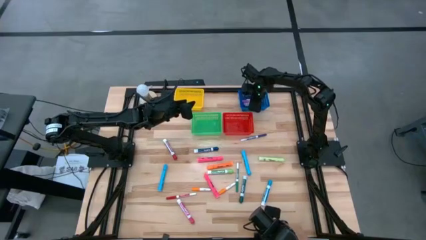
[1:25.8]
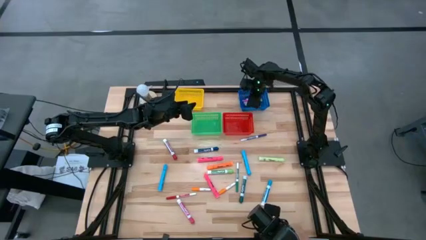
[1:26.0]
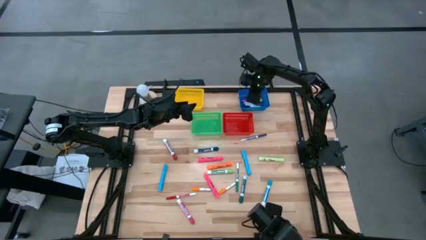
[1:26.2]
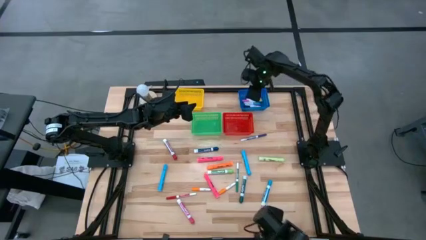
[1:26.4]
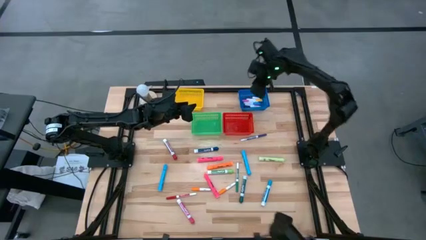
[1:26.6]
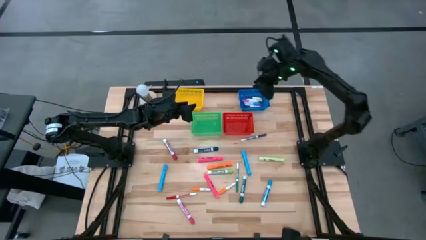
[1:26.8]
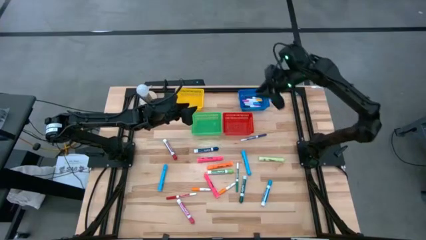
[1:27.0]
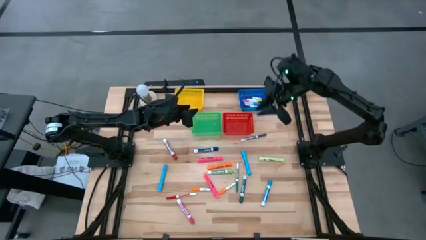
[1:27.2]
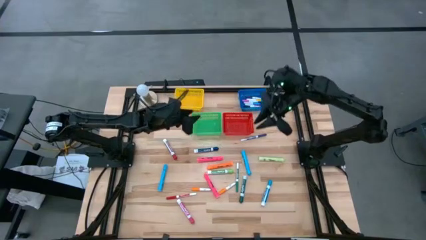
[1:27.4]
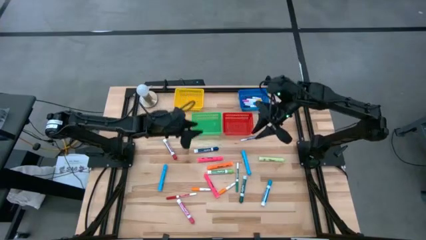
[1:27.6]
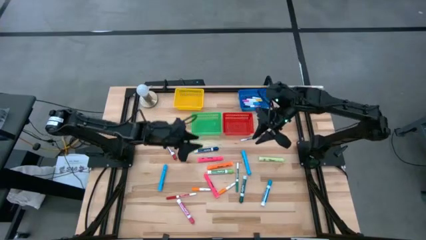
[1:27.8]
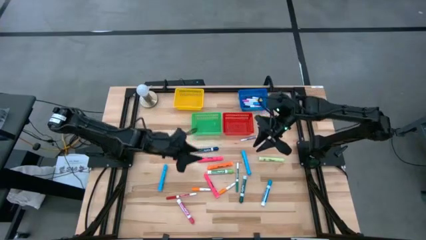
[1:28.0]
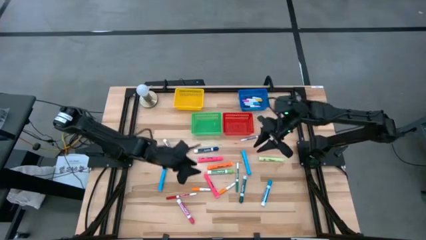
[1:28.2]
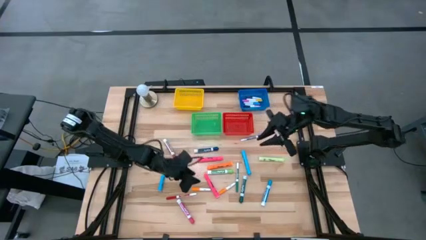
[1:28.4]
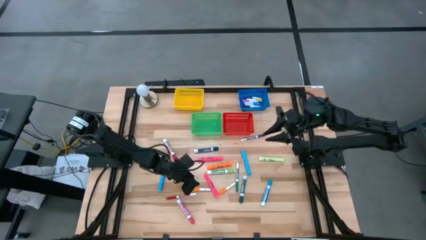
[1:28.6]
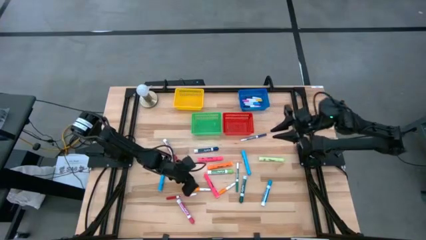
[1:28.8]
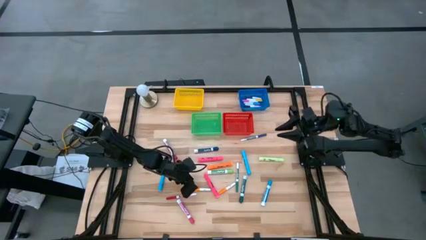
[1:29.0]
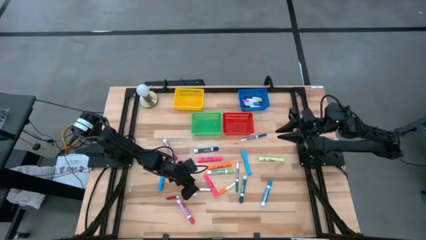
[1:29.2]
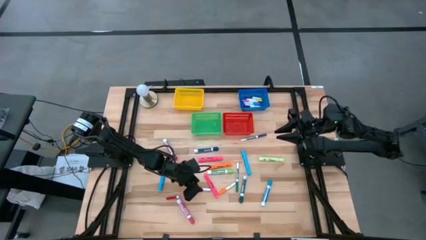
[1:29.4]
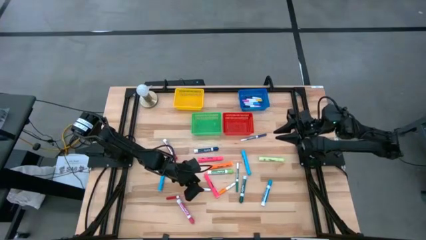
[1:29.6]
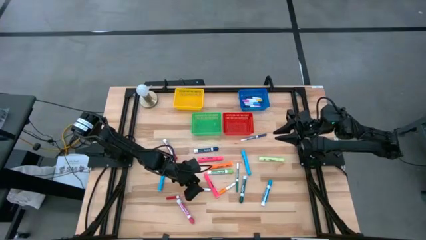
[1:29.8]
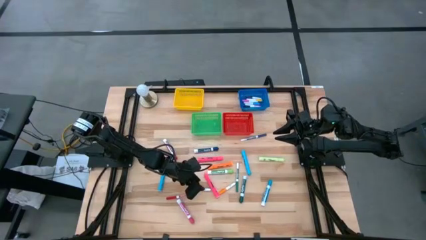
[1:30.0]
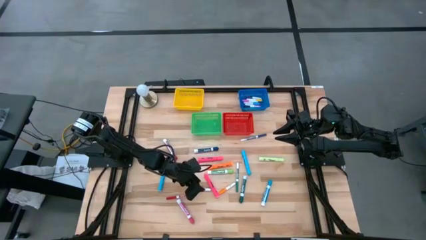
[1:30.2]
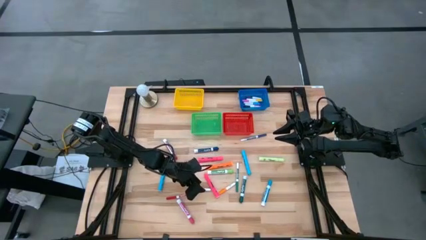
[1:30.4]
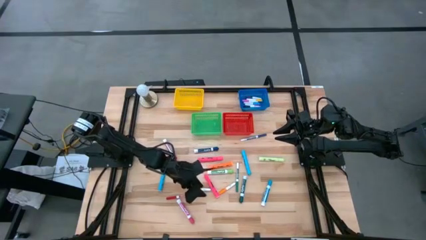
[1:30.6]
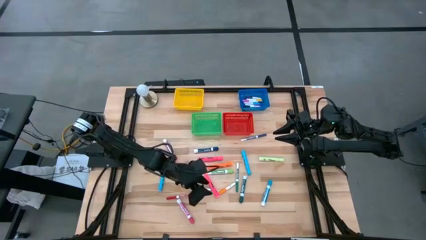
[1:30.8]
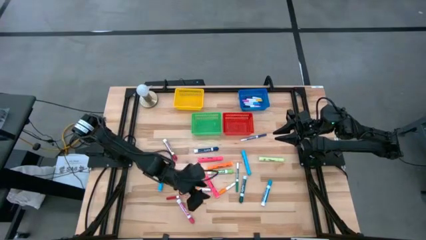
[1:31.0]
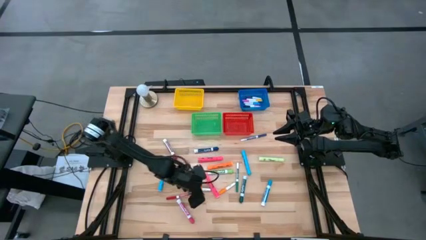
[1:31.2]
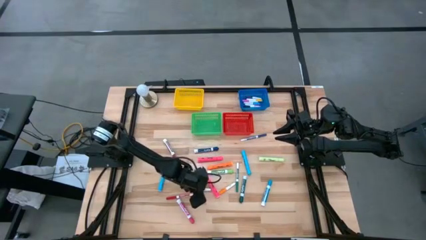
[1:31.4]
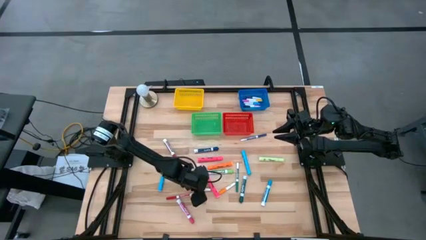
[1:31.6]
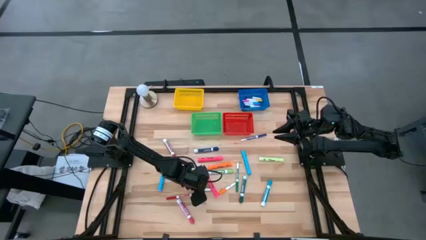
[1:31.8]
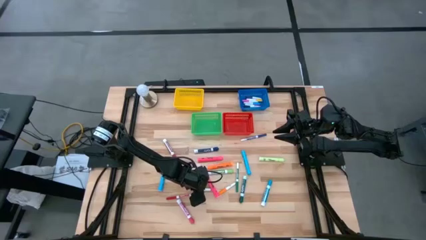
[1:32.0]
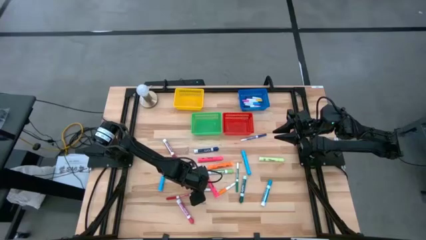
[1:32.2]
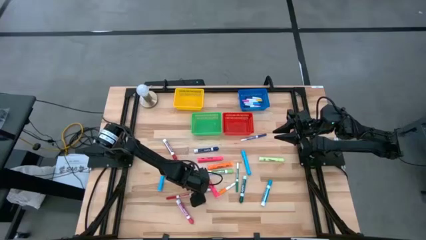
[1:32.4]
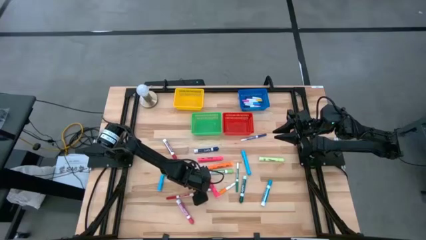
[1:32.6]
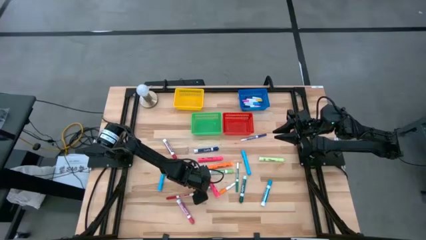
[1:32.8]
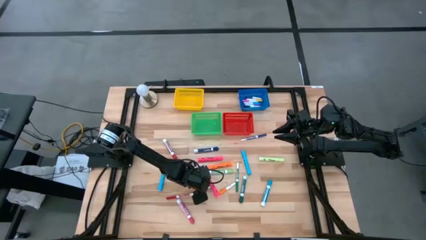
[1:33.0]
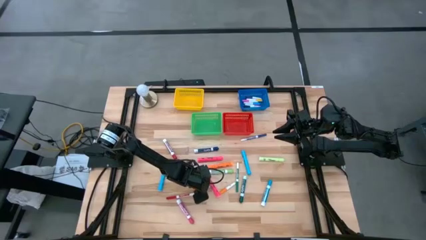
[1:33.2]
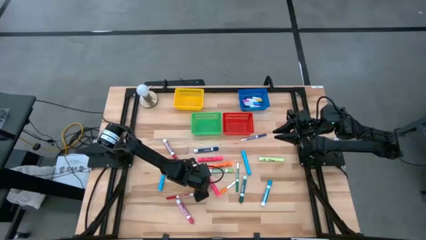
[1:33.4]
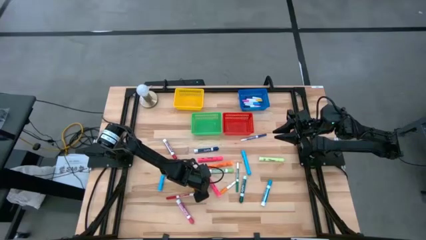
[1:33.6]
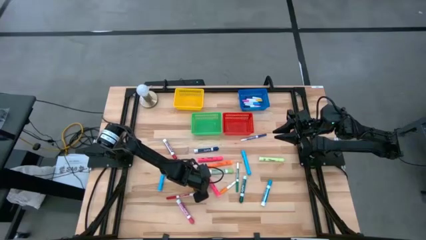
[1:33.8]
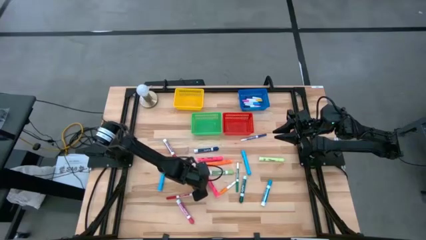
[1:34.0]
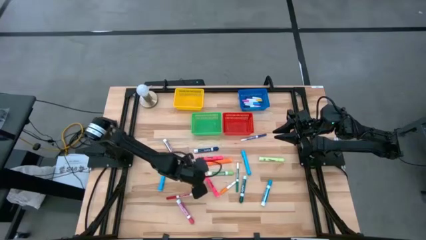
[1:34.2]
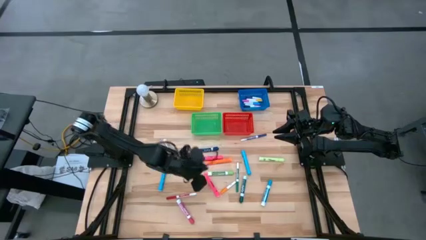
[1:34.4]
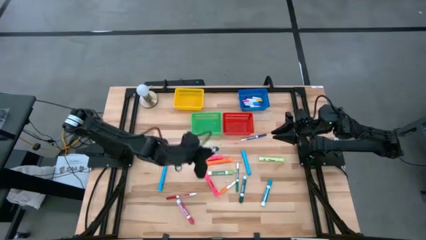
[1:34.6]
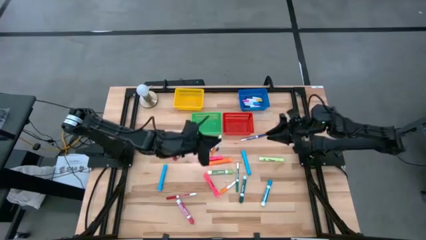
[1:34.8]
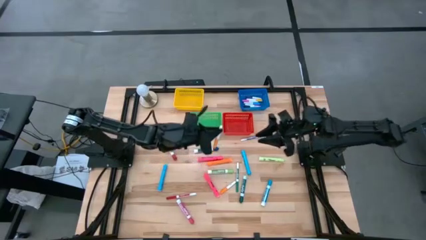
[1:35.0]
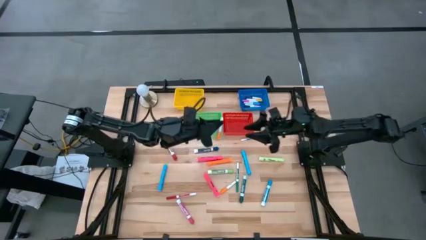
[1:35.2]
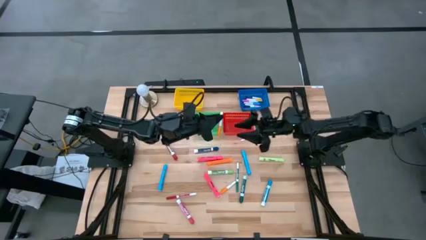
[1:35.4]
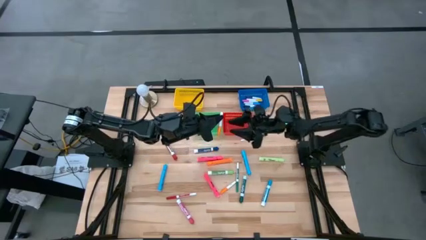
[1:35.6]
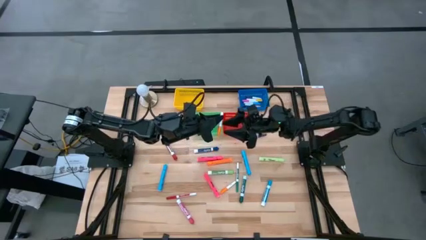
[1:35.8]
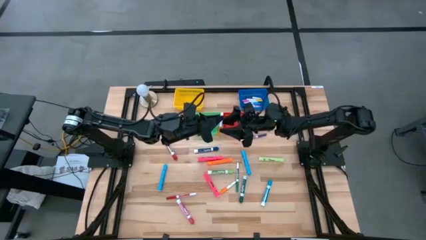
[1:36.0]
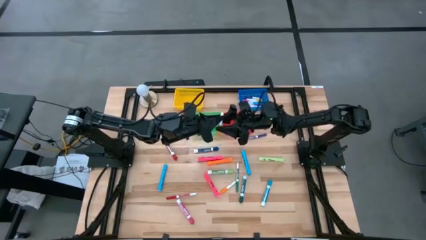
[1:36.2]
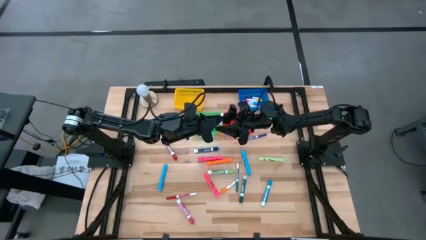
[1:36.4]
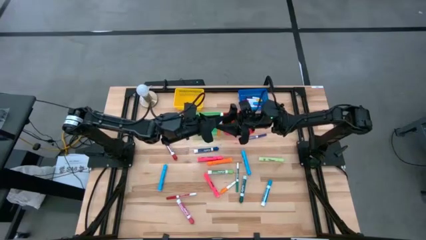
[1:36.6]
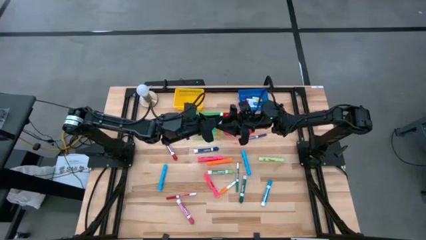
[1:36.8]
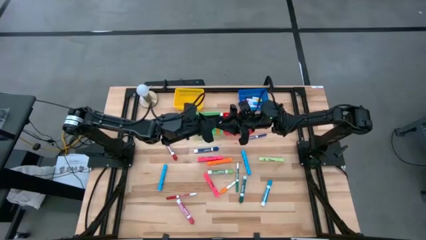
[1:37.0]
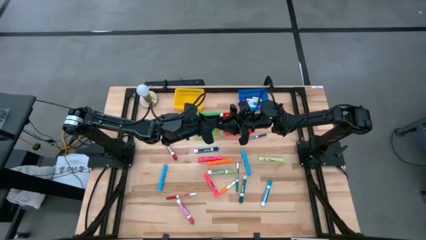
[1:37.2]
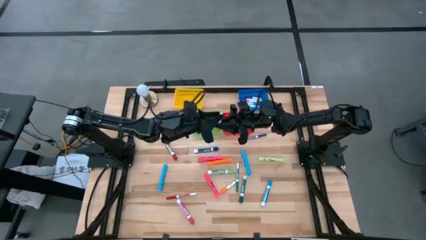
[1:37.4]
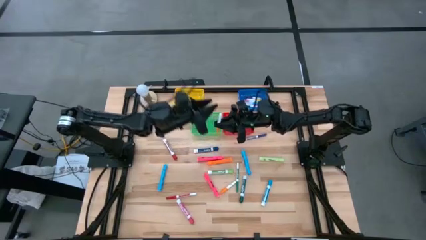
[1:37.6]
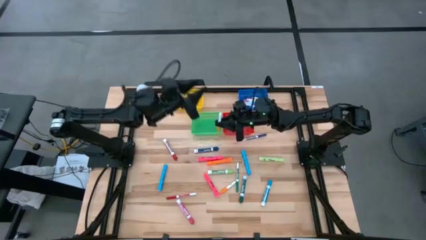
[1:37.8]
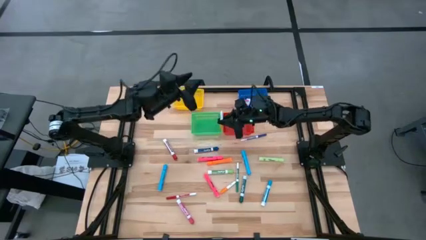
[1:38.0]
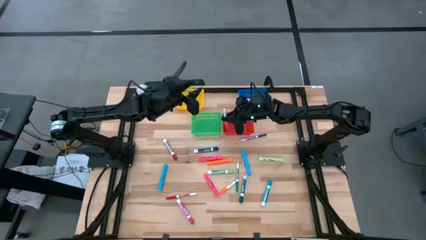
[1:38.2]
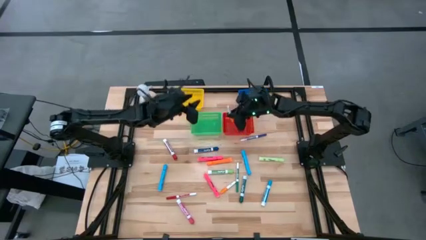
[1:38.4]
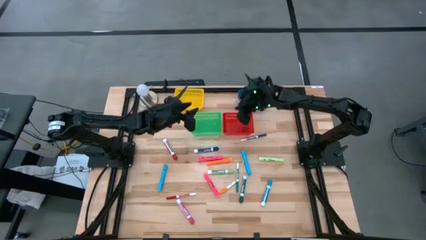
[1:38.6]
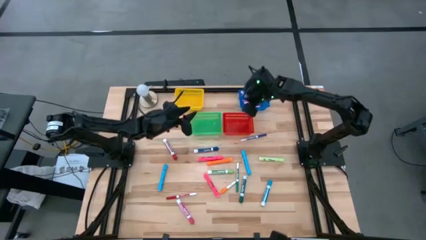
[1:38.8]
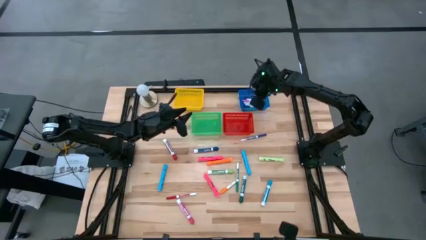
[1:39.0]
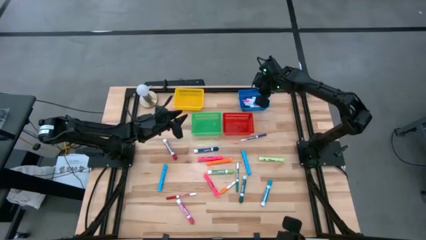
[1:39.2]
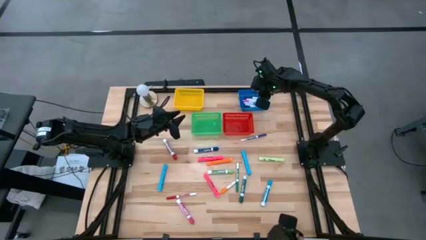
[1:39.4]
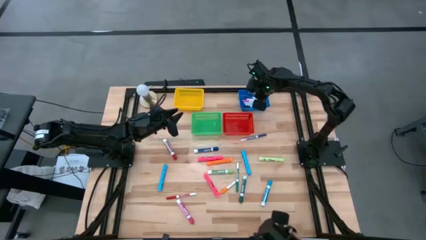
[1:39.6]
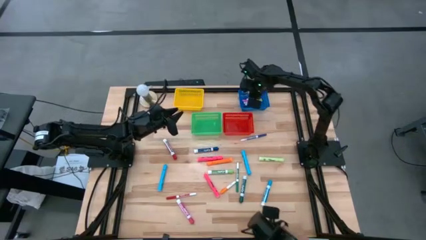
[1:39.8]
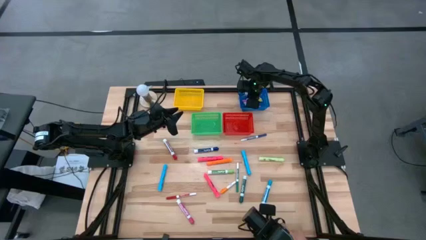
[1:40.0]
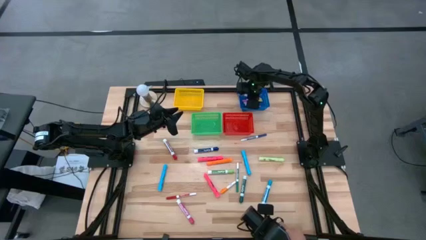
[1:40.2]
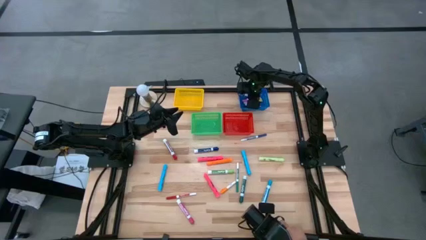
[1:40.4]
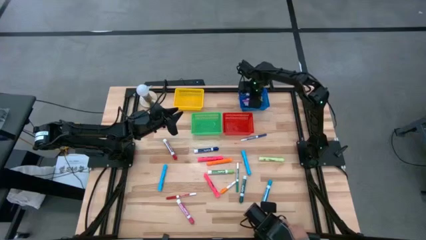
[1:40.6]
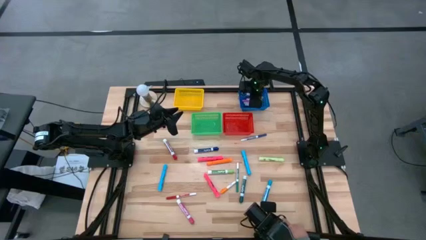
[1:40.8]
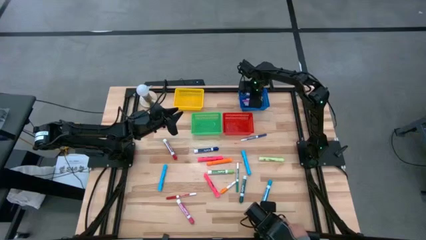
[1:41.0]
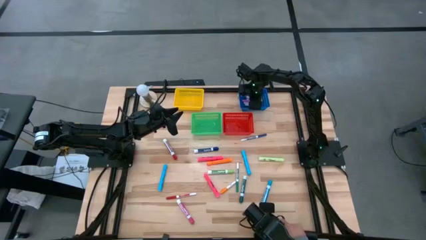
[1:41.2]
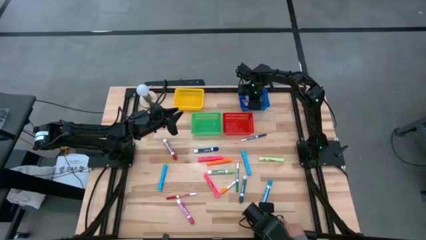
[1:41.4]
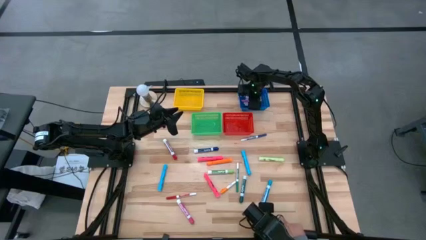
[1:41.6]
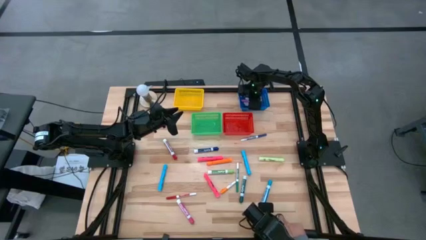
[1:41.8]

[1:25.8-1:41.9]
Task: Pick & Place Markers
Put the orange highlighter into the blue bin
